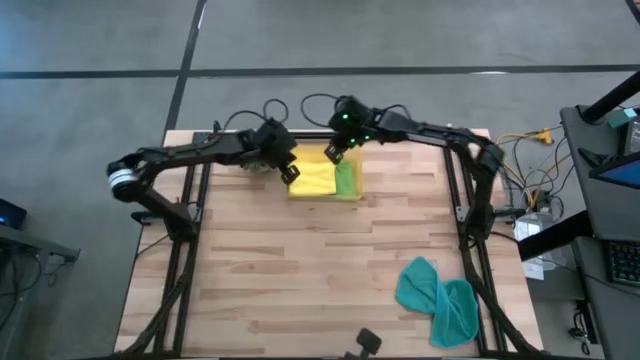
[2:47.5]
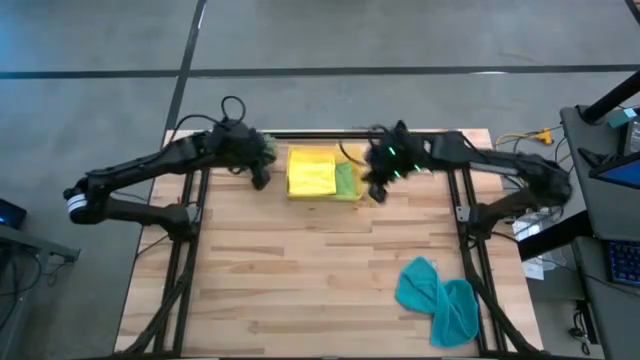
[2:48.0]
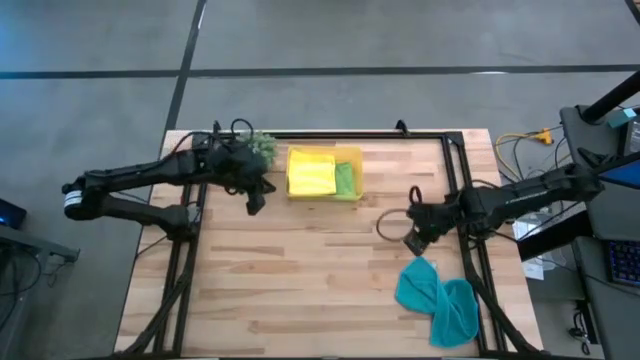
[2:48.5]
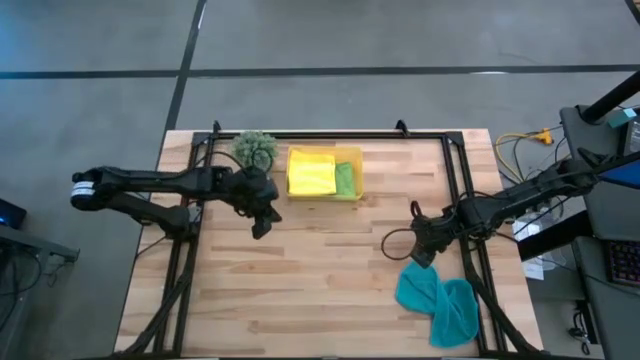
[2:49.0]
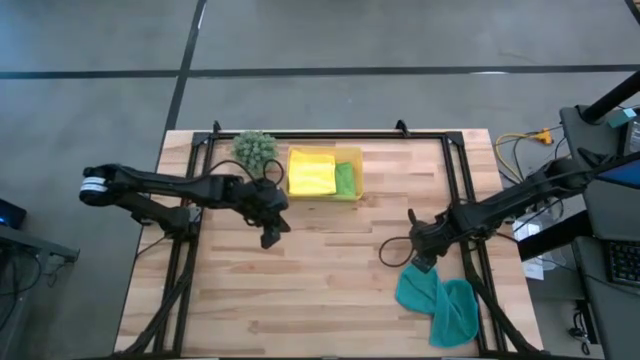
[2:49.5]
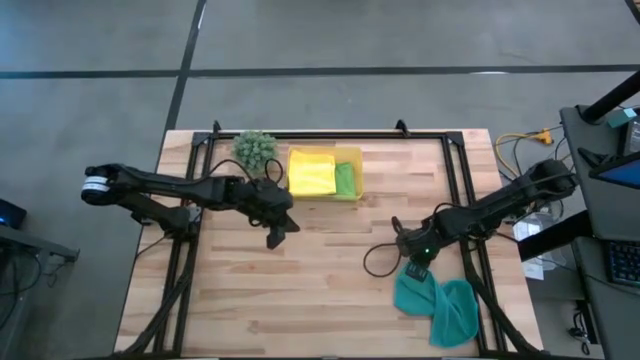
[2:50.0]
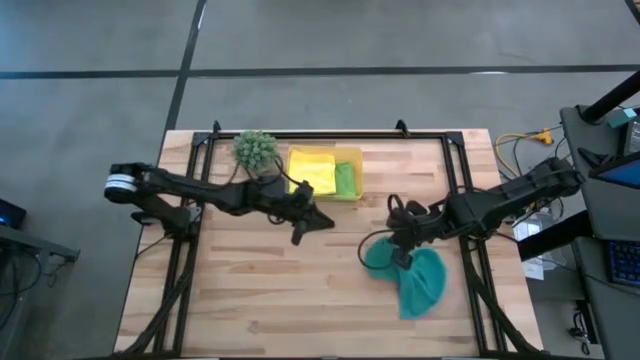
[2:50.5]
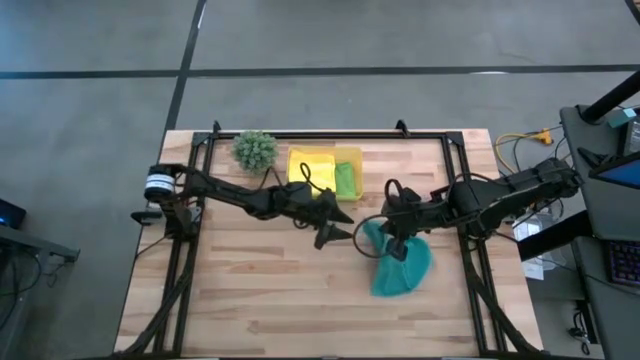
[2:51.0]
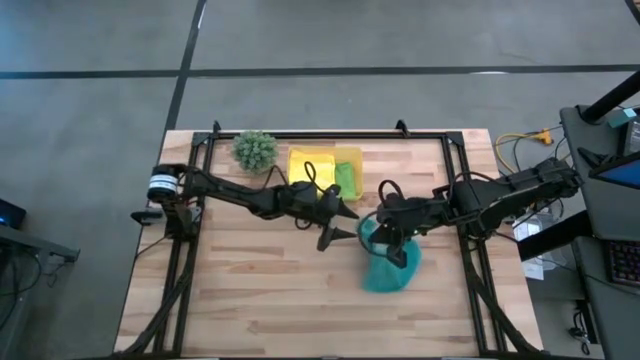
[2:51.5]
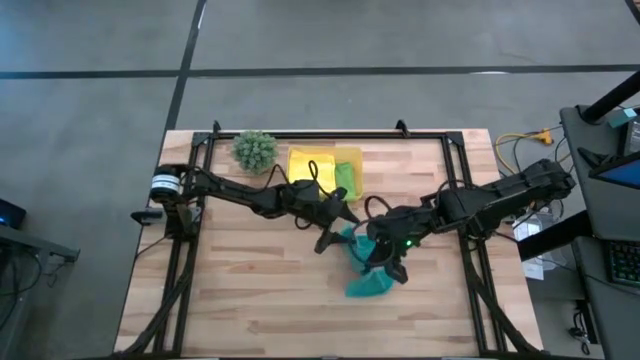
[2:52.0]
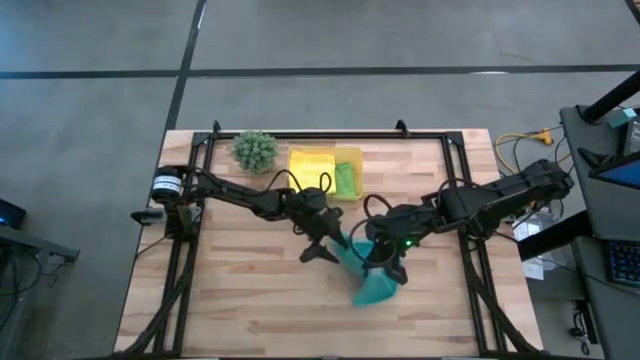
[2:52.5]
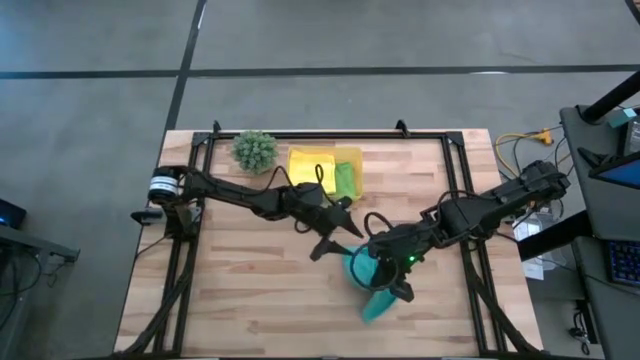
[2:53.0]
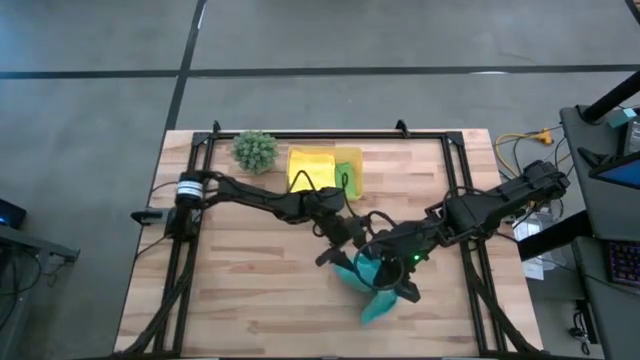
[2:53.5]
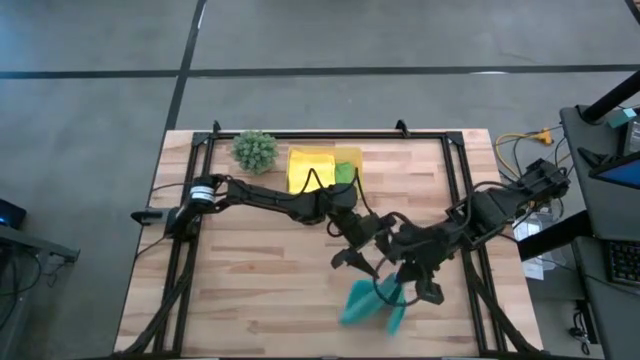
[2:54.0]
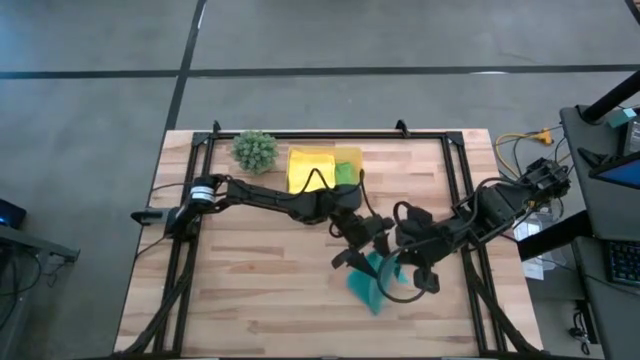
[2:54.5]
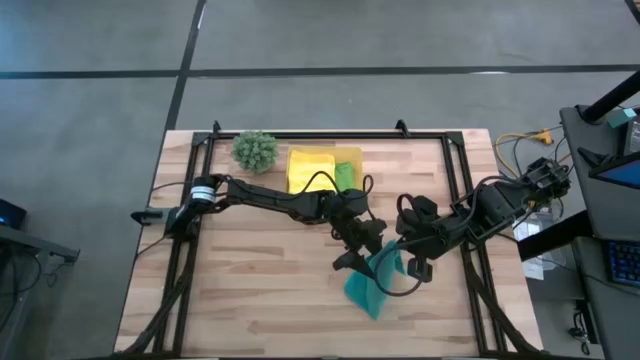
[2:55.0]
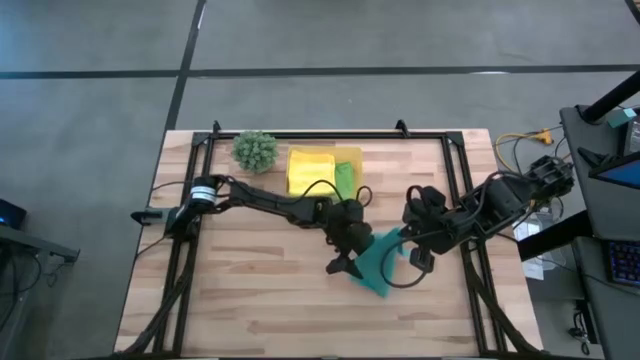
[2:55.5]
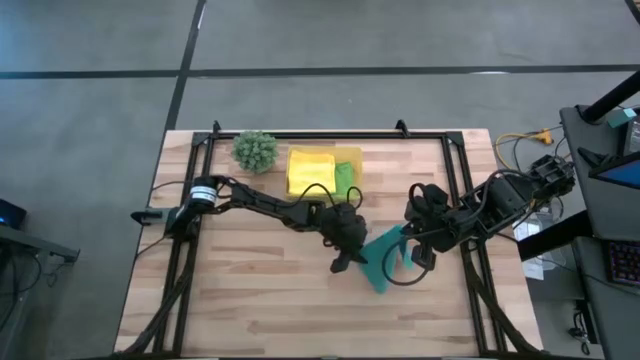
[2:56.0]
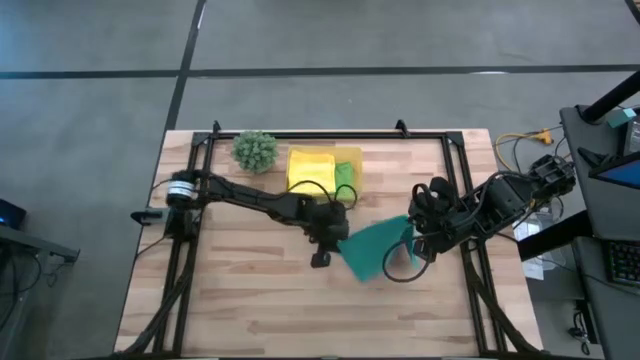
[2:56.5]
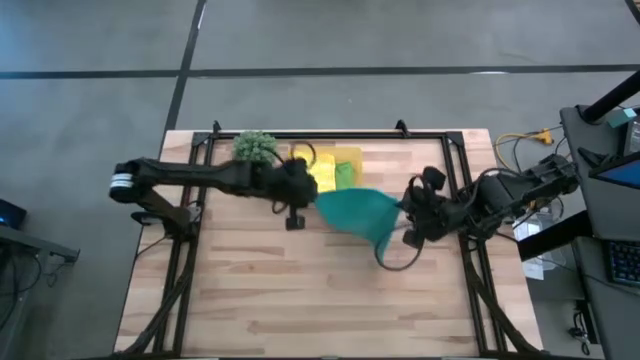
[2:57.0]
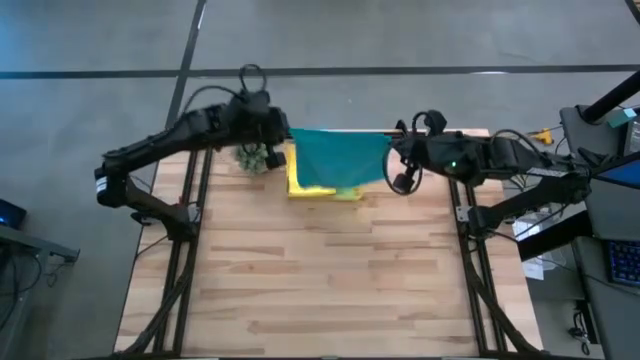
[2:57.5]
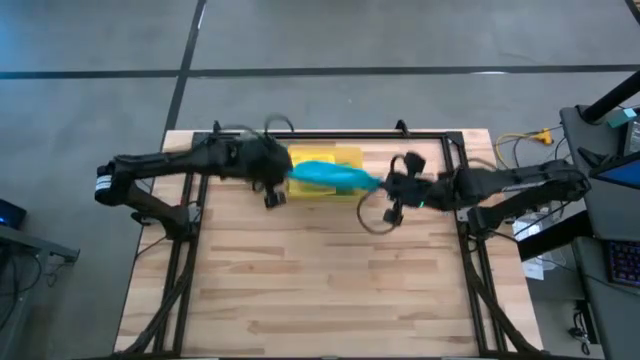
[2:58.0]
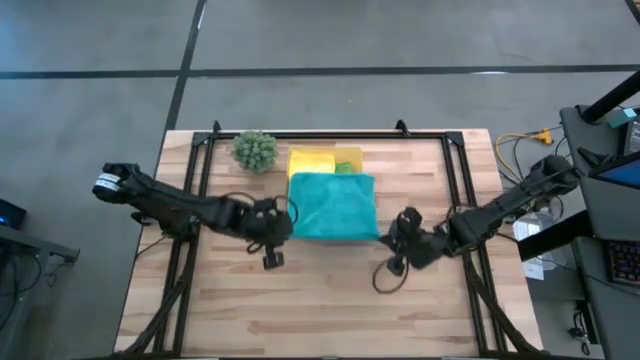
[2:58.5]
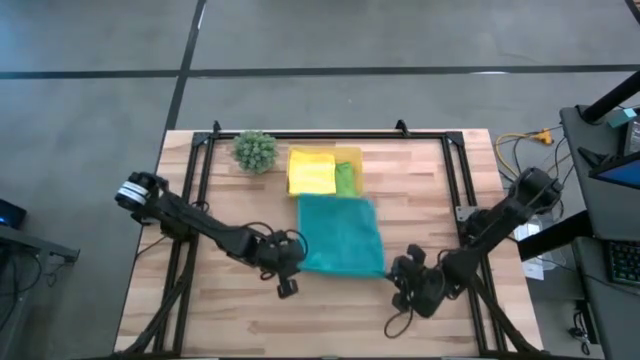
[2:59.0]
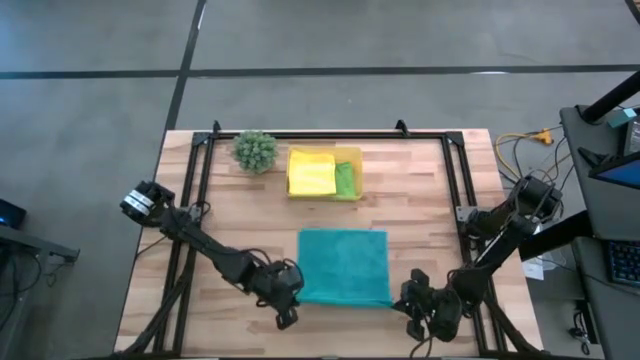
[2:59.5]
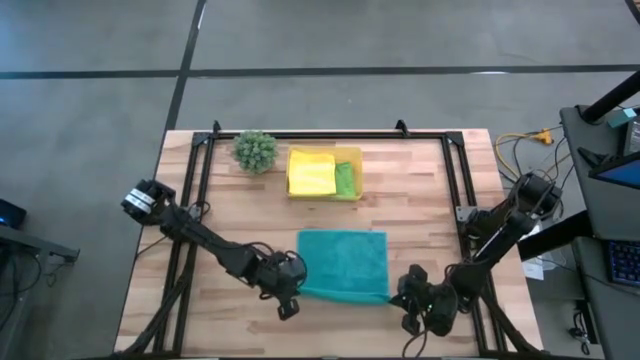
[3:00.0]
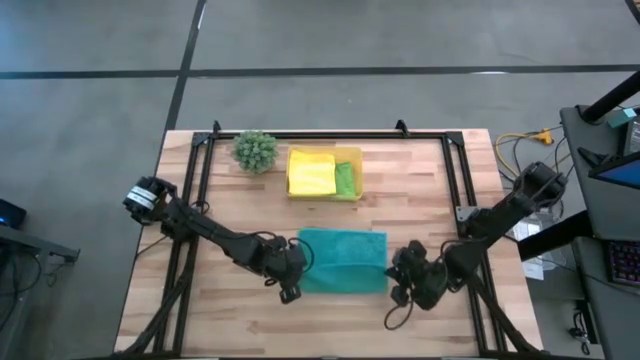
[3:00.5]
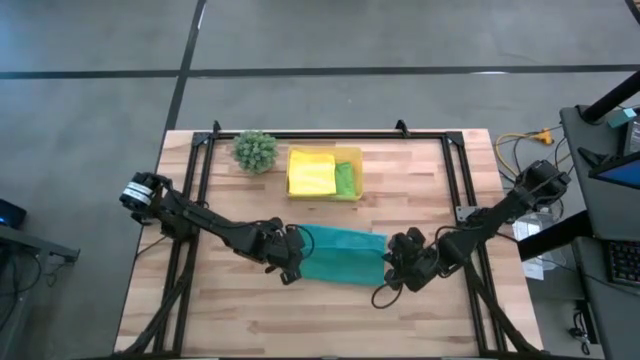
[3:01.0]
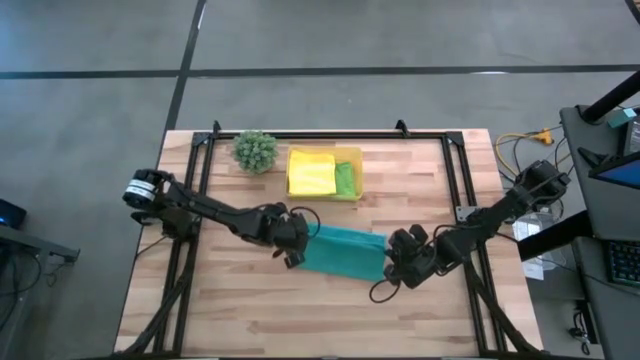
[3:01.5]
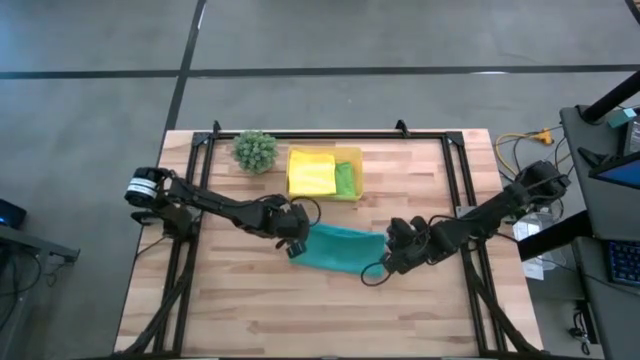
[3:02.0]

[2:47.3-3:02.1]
Task: Fold microfiber towels
Fold the light blue towel

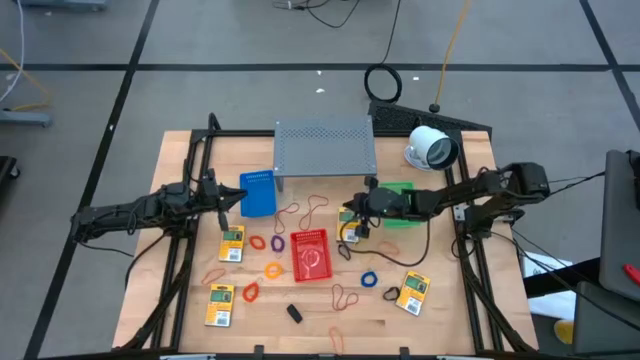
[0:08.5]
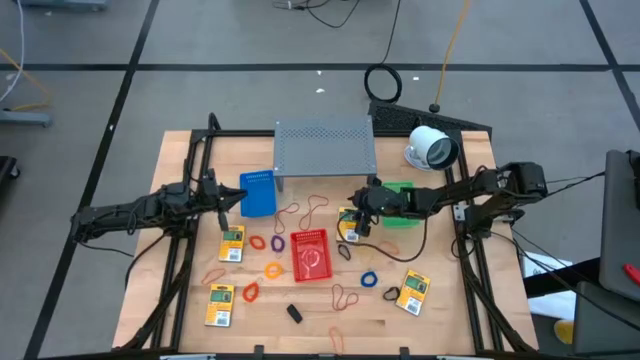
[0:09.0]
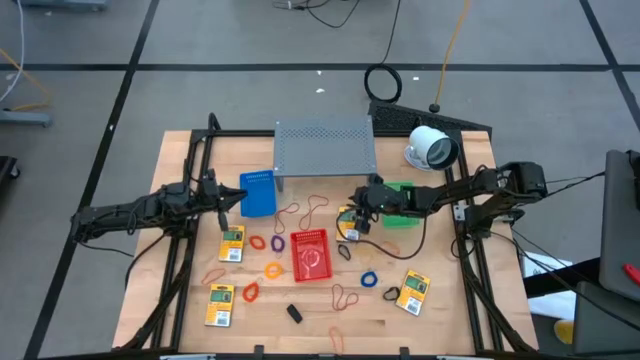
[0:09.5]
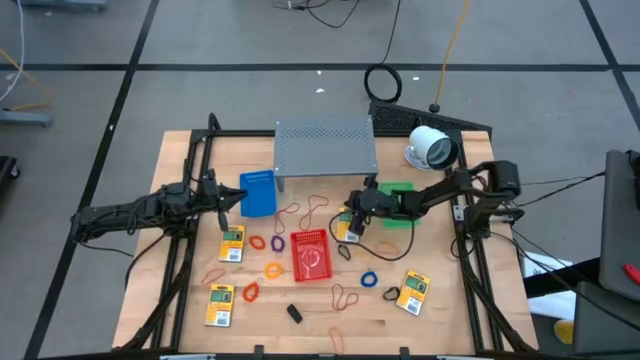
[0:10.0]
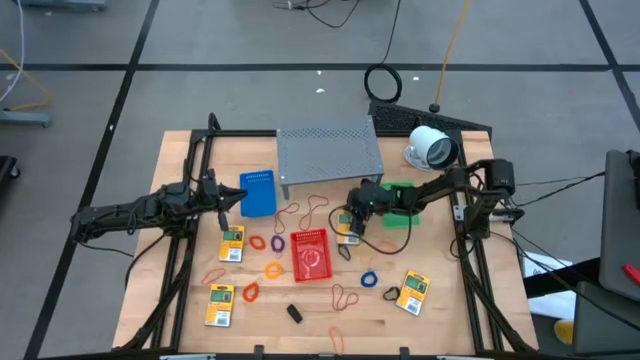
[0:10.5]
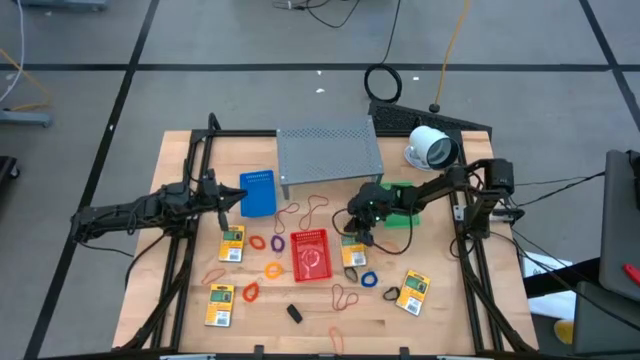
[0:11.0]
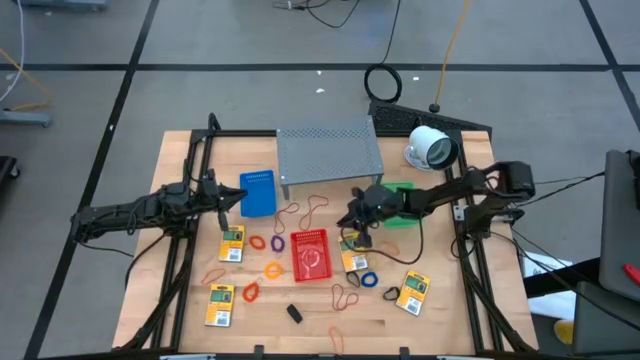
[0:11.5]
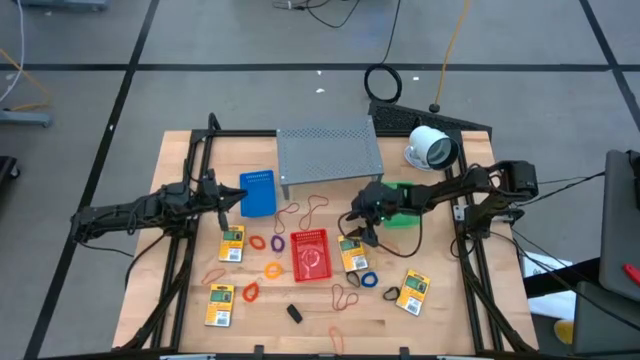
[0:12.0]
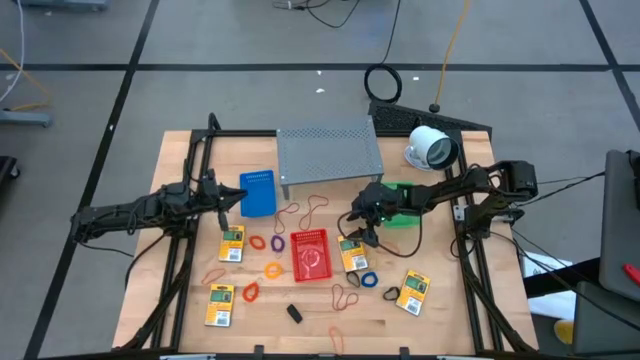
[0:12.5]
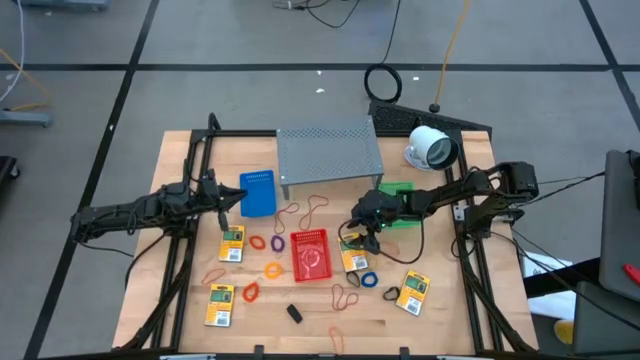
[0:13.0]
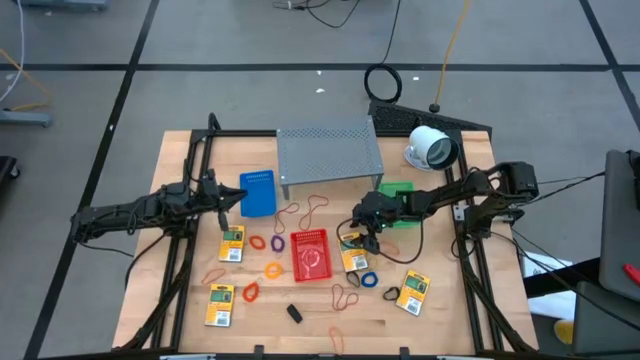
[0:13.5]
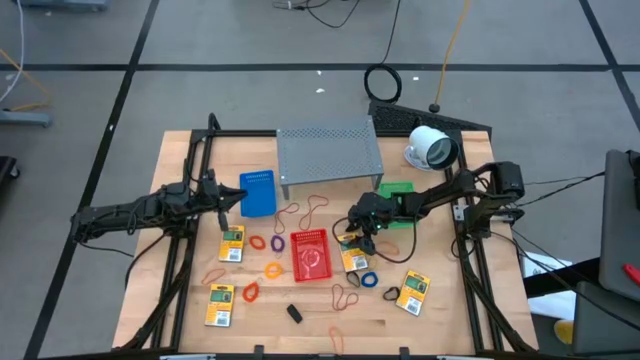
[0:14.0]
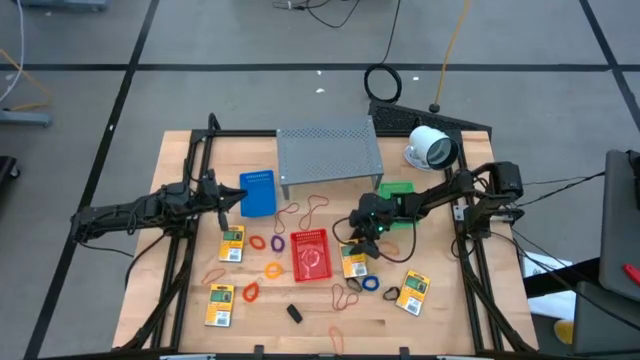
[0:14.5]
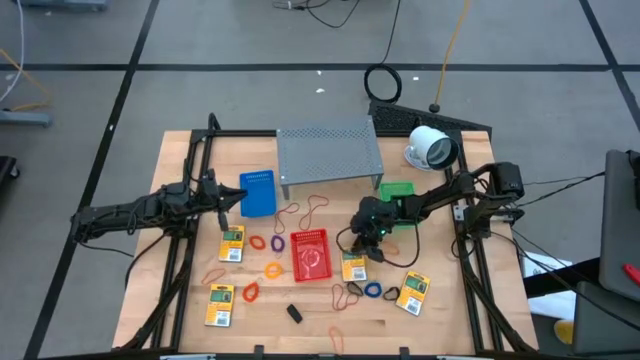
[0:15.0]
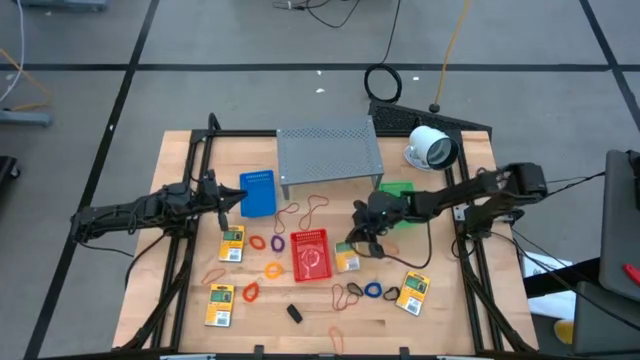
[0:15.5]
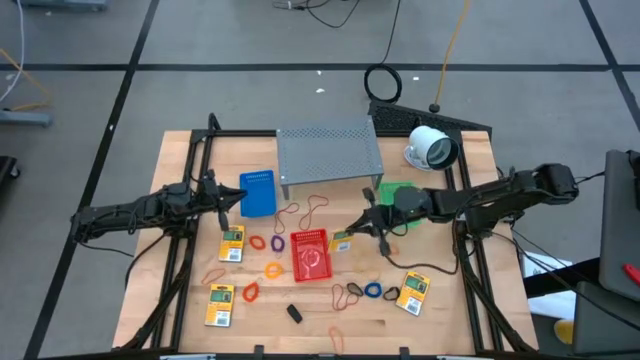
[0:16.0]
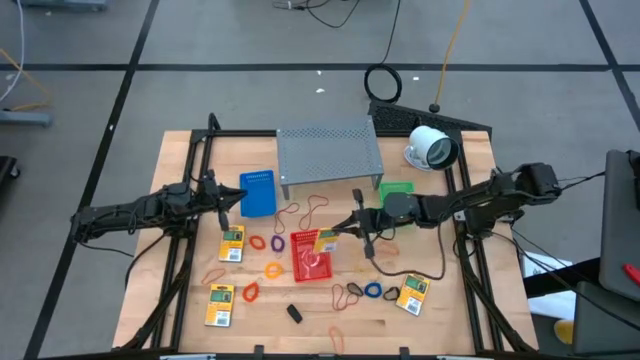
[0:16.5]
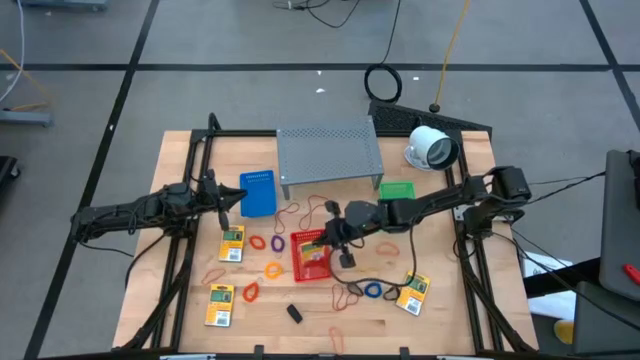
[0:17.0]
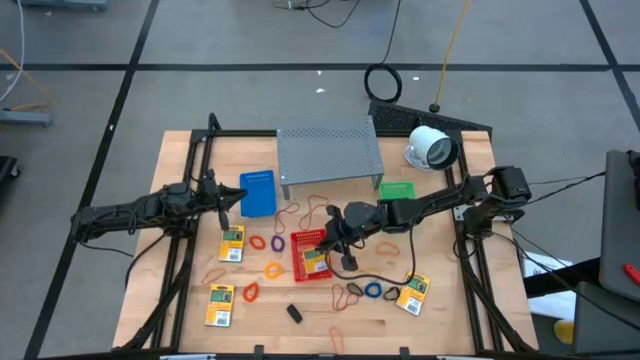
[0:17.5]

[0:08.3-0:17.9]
Task: Pick & Place Office Desk Supplies
Put the yellow crayon box into the red bin
